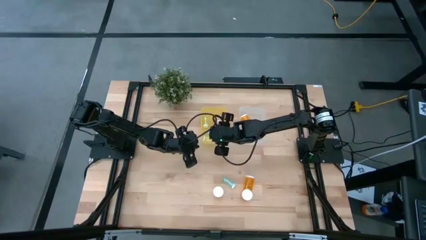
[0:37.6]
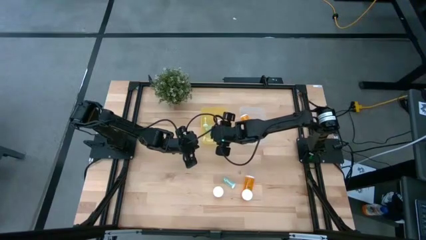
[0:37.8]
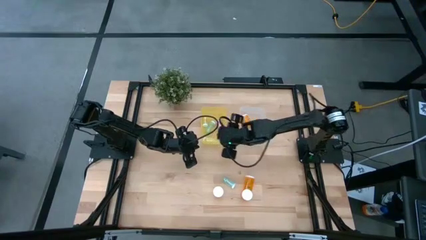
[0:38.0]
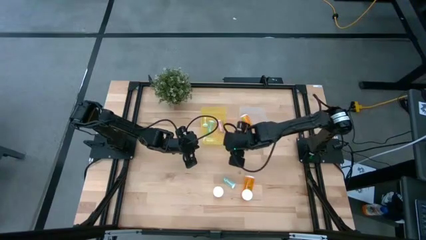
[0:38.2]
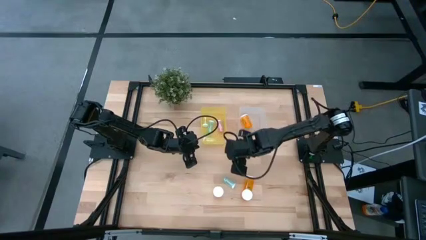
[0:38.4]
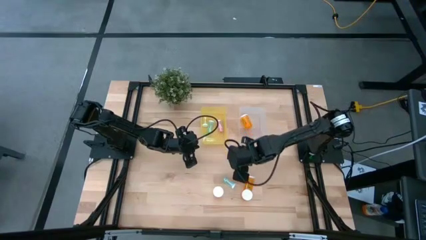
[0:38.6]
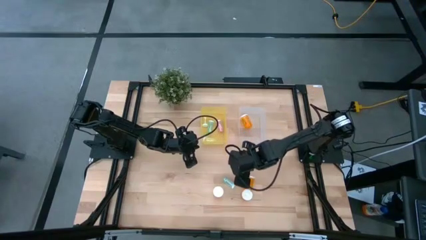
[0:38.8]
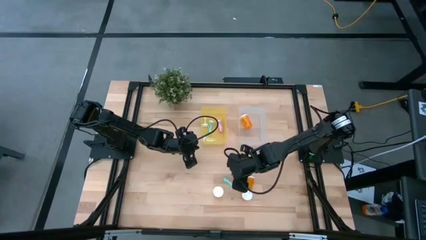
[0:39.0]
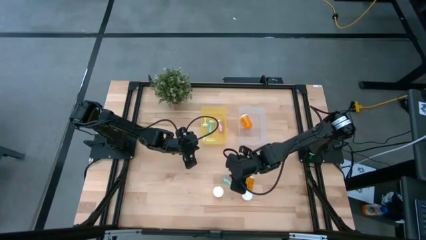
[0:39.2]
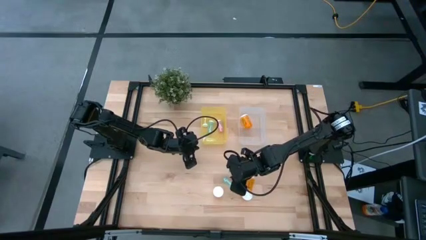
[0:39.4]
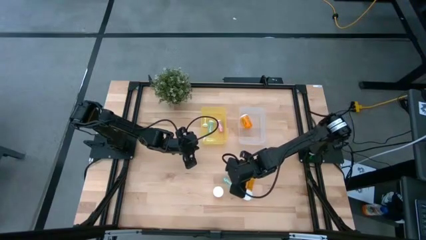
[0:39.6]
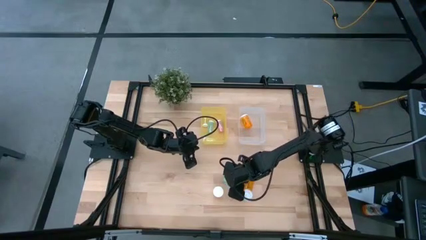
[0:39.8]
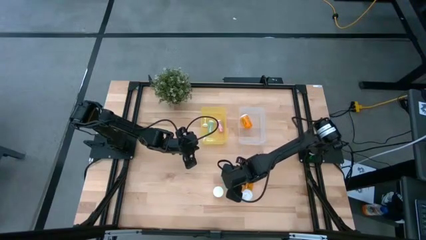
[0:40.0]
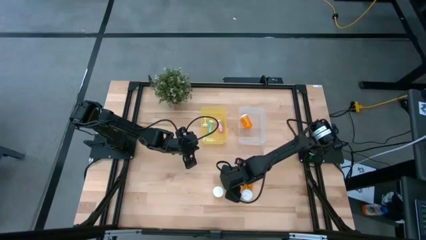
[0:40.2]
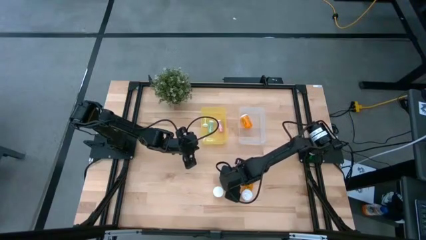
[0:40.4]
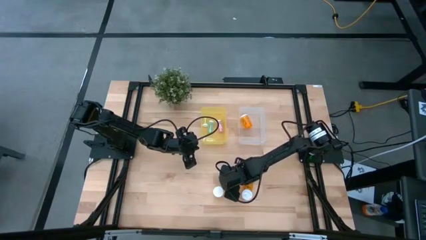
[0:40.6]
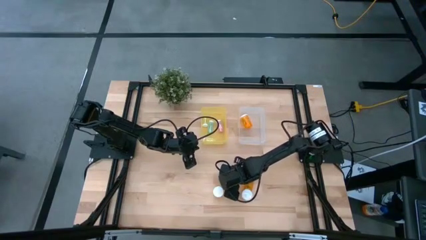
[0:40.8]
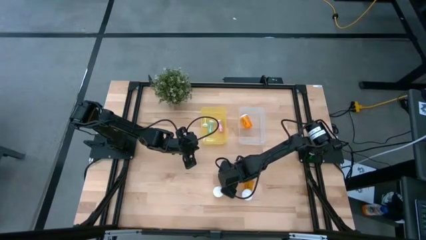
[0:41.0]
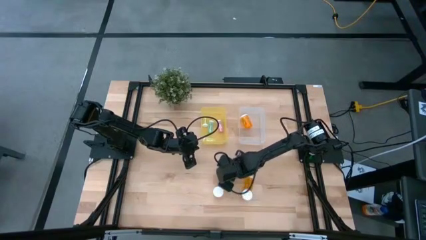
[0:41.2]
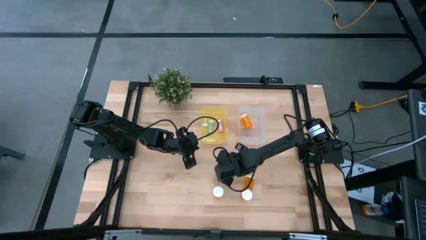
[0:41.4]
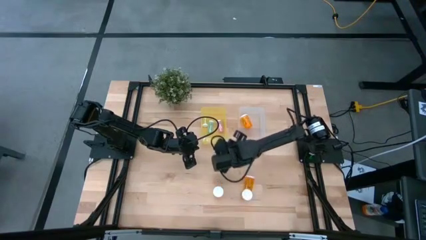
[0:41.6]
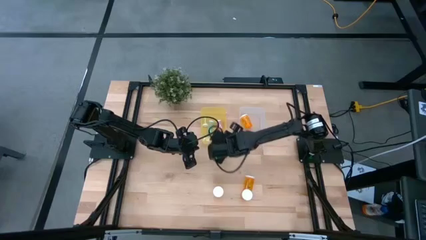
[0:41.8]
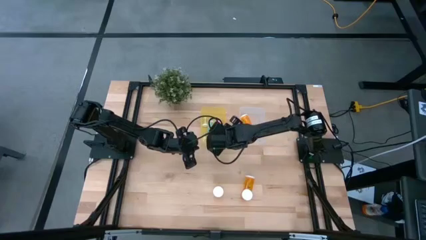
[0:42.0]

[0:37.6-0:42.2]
Task: Pick and place medicine bottles into bin by pill shape (circle, oval)
Put the small blue pill bottle into the yellow bin

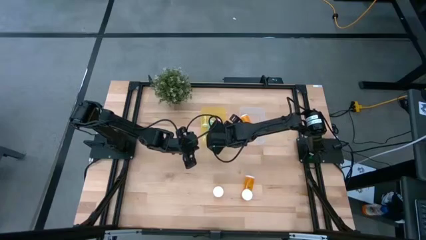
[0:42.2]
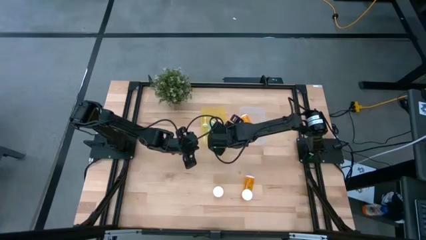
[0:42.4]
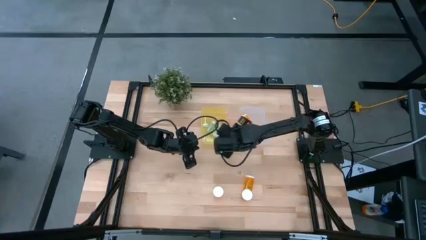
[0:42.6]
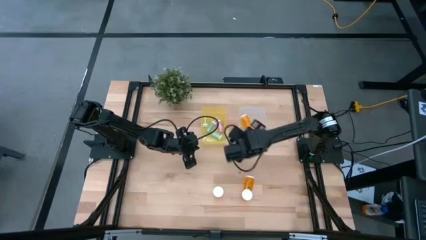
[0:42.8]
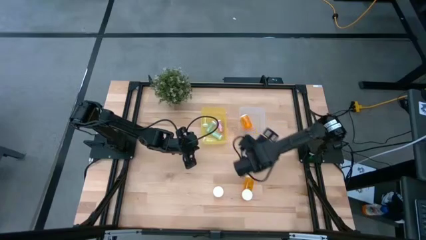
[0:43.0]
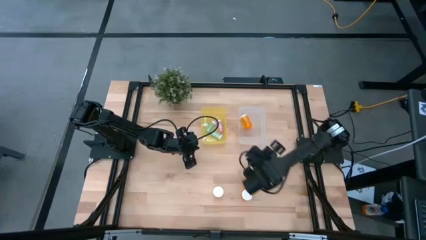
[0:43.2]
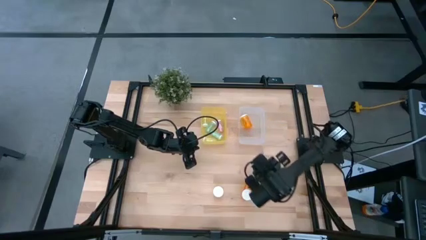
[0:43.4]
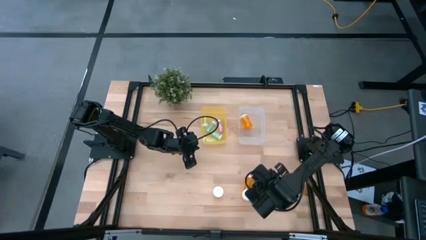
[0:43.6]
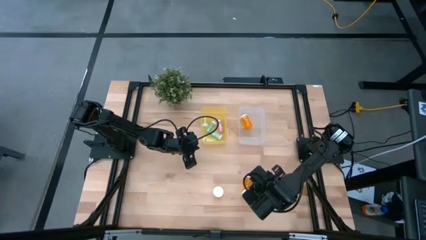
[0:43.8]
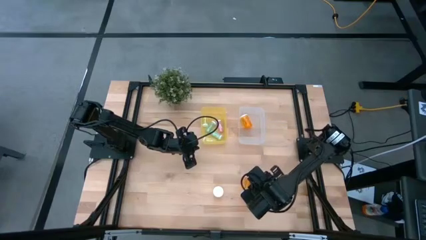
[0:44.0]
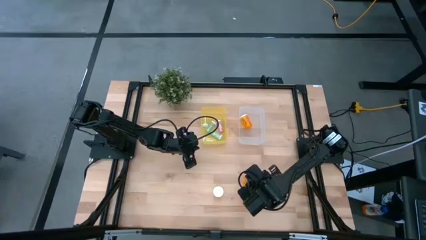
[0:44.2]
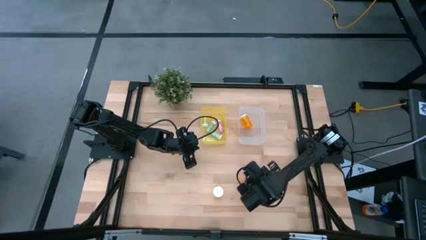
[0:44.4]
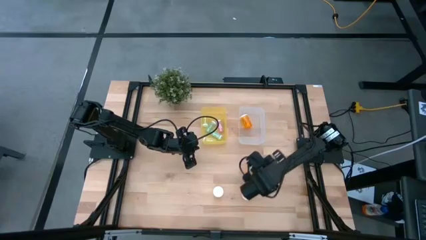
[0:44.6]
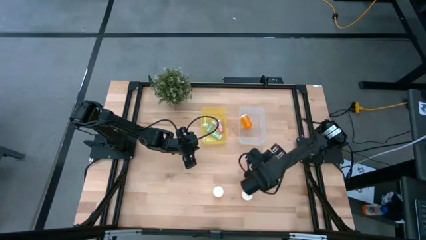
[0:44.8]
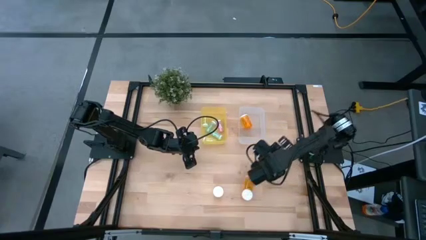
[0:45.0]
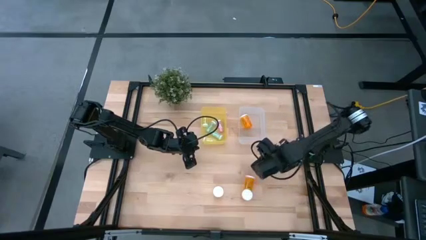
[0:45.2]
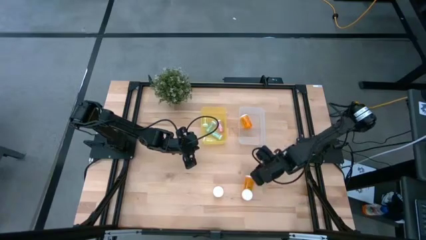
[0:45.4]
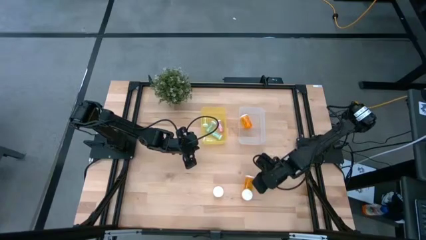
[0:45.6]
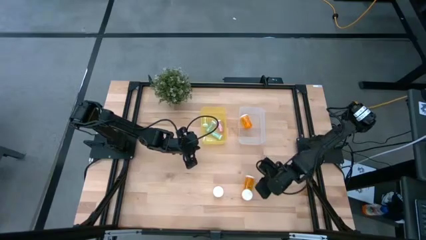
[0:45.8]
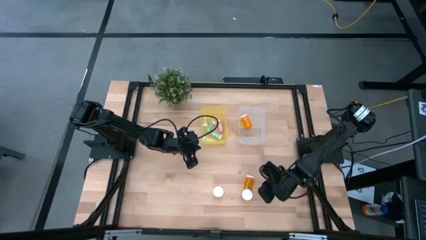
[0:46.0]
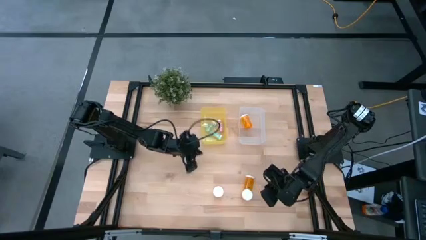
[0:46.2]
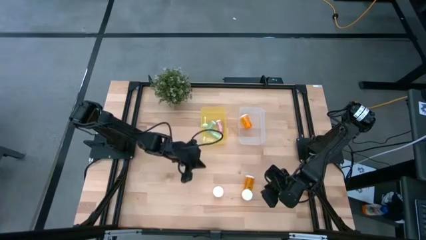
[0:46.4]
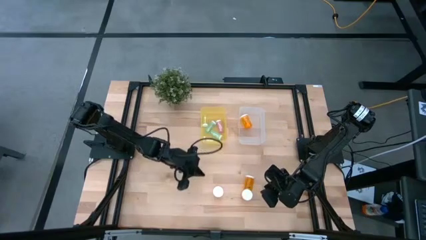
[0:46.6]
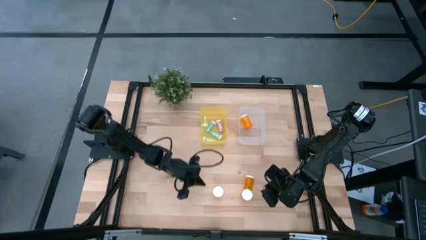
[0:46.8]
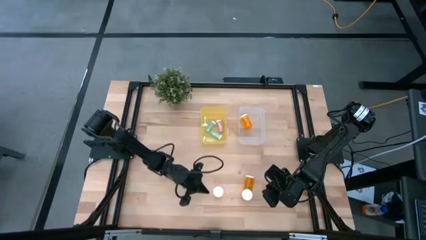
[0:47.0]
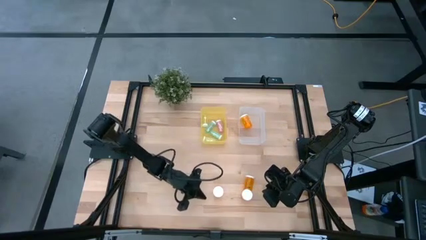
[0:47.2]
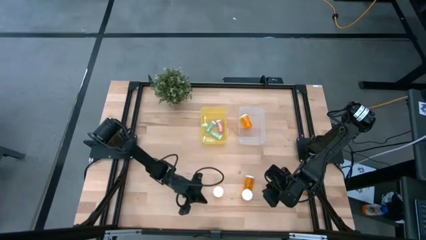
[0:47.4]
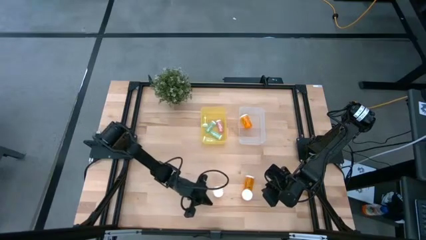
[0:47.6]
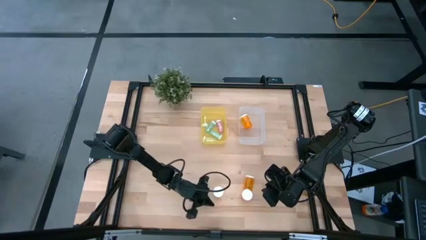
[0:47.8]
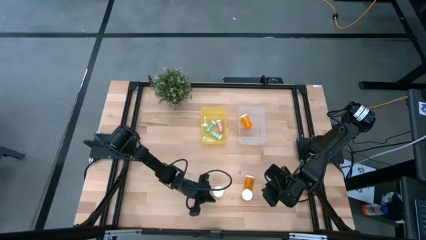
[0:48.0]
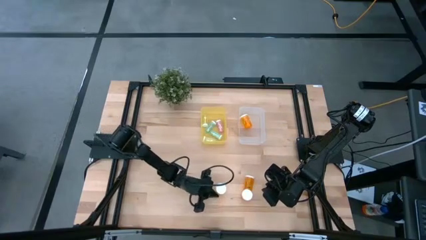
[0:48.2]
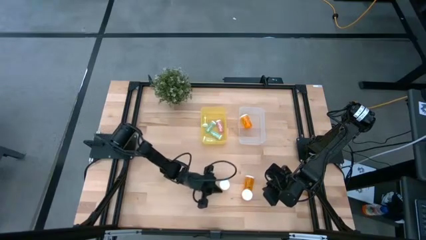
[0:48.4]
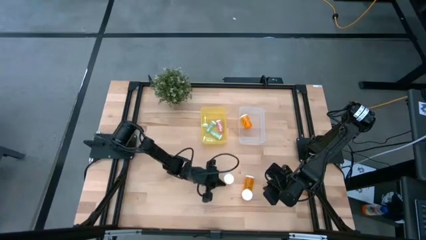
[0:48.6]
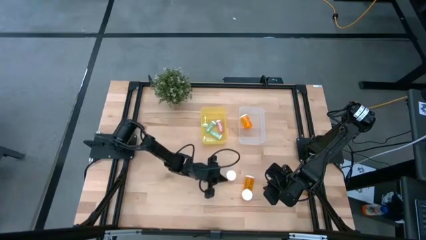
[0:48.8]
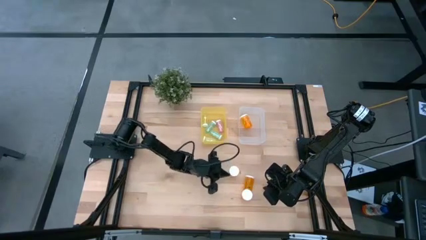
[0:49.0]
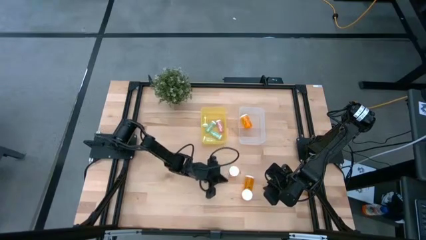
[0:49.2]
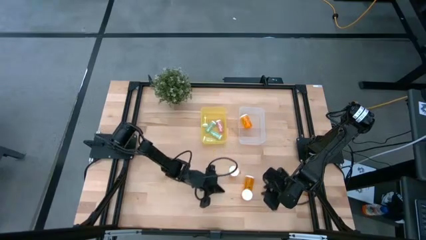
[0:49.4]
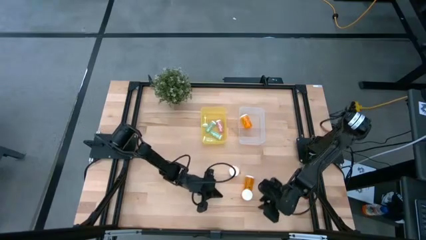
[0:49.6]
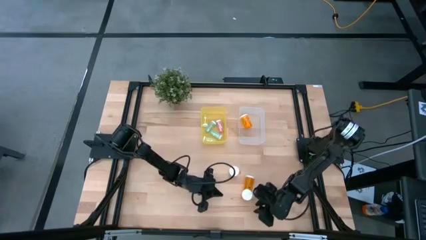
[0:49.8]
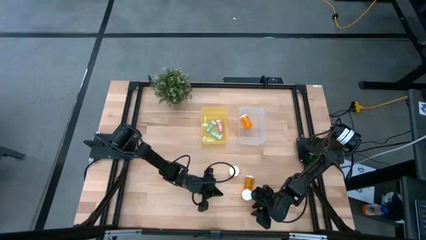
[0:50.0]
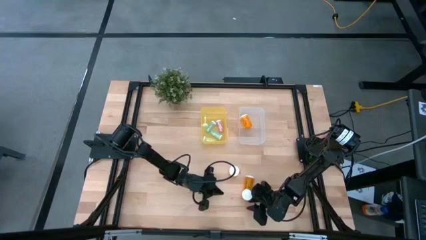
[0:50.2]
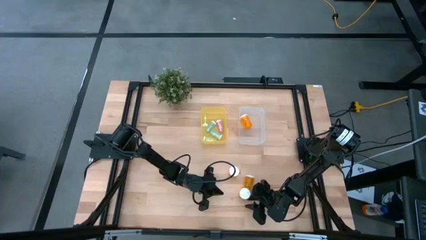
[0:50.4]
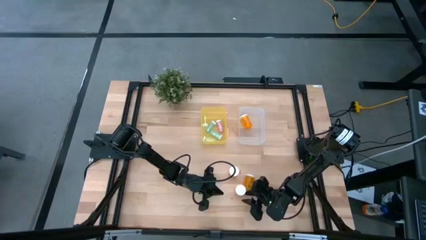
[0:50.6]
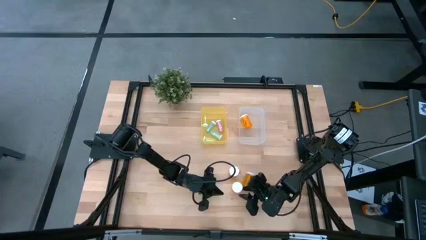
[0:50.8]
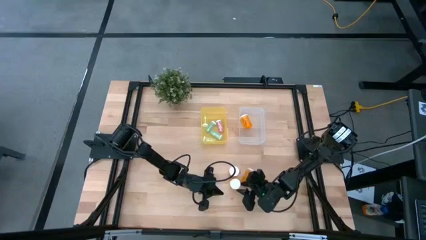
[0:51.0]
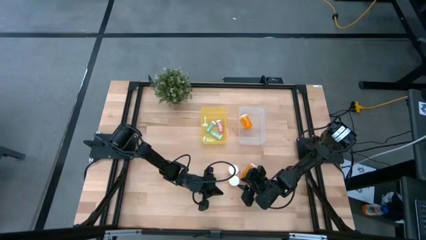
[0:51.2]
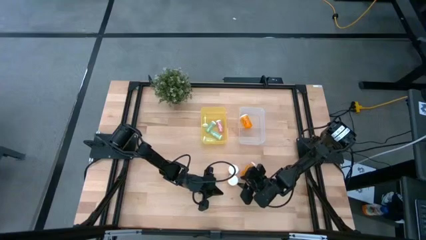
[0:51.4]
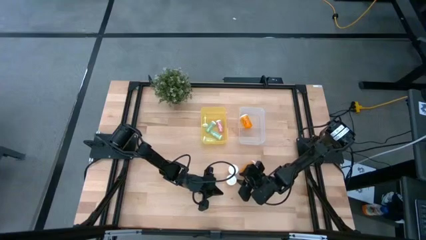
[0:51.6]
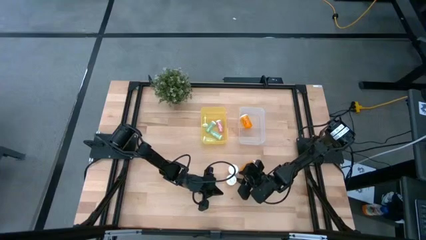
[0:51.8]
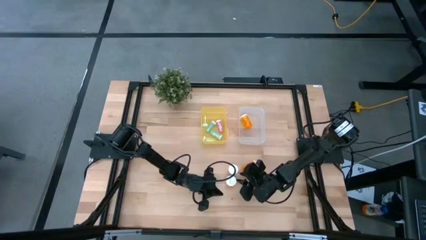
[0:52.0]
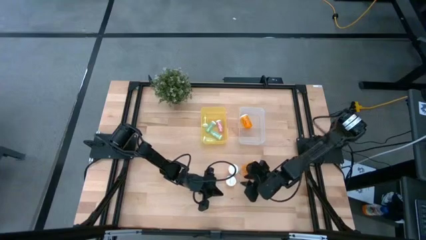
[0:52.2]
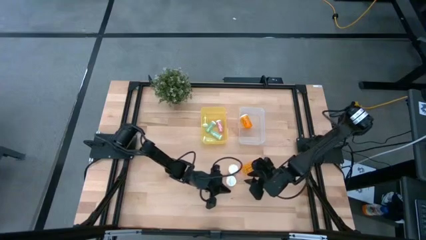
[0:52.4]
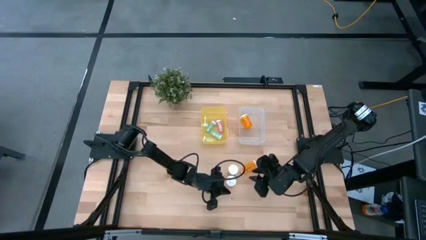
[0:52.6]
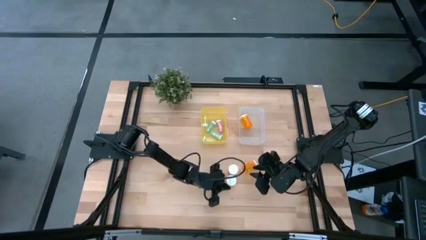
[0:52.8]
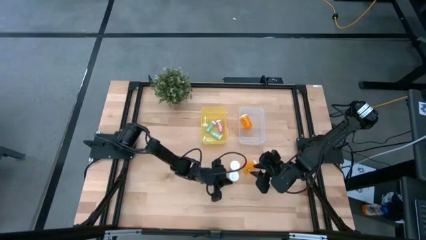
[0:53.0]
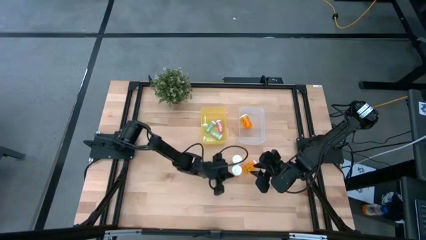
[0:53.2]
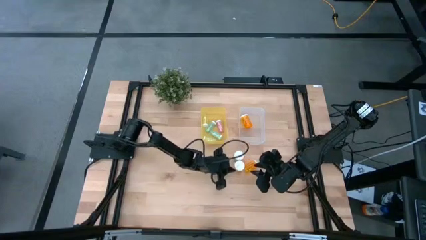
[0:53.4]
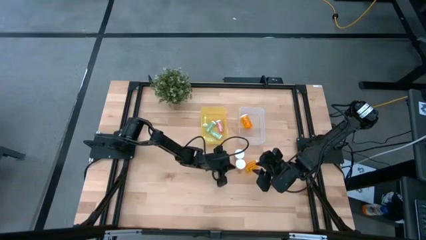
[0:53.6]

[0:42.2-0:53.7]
Move the large orange pill bottles to the center of the table
